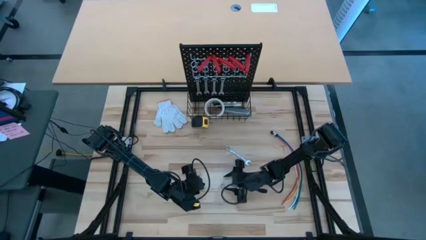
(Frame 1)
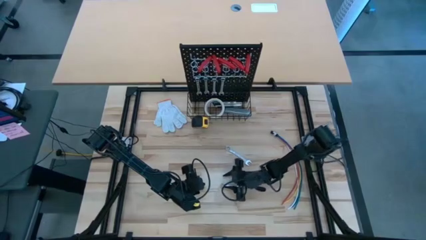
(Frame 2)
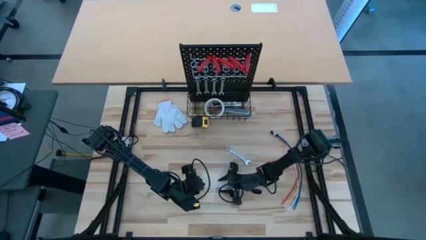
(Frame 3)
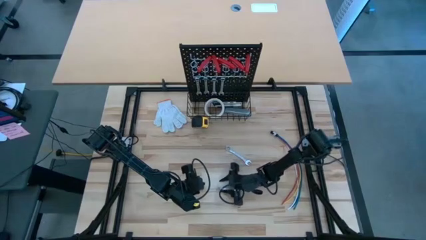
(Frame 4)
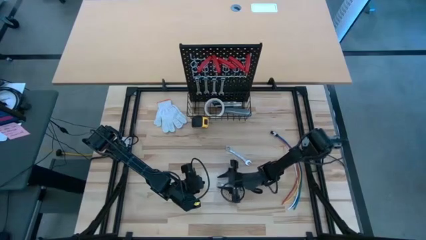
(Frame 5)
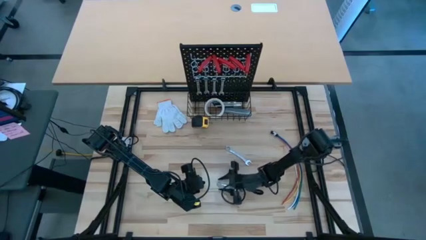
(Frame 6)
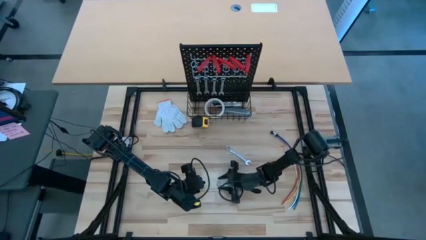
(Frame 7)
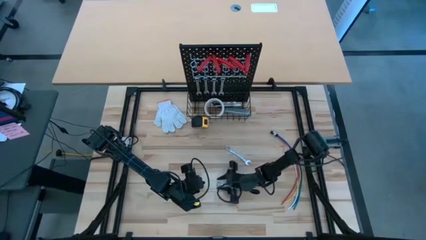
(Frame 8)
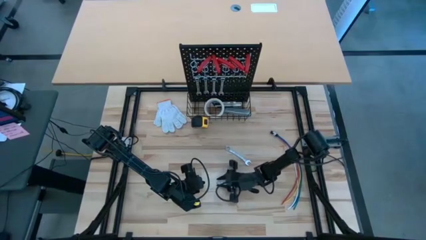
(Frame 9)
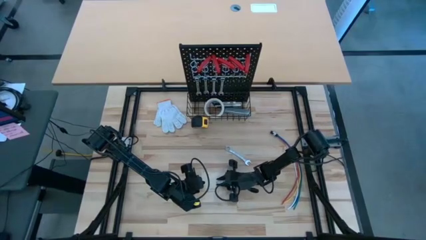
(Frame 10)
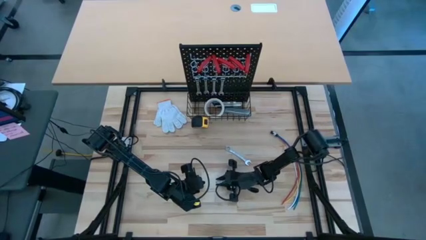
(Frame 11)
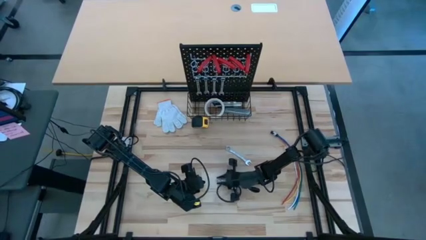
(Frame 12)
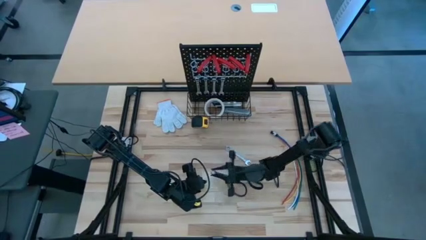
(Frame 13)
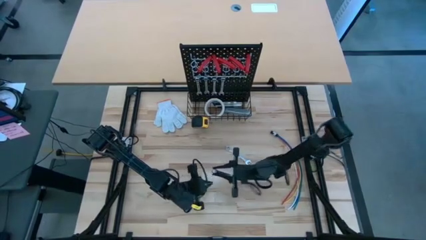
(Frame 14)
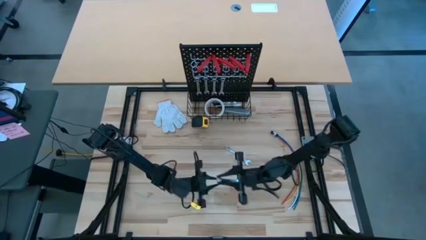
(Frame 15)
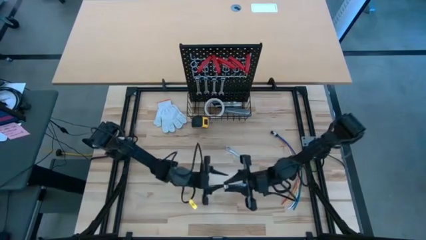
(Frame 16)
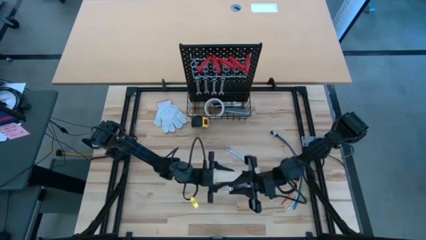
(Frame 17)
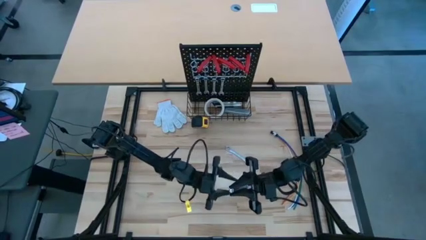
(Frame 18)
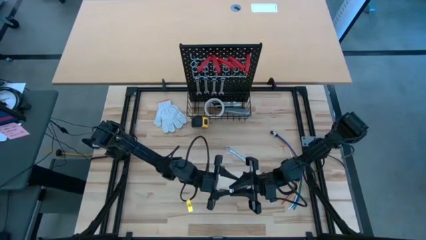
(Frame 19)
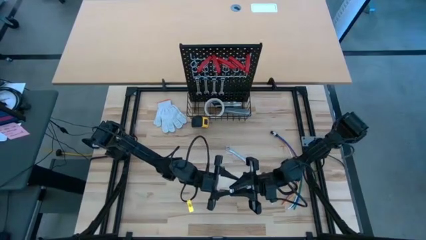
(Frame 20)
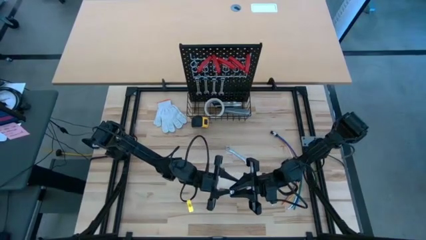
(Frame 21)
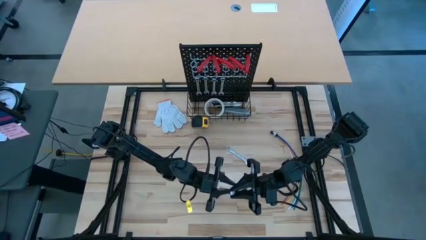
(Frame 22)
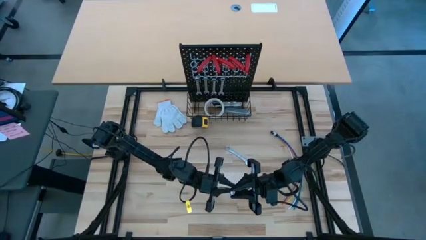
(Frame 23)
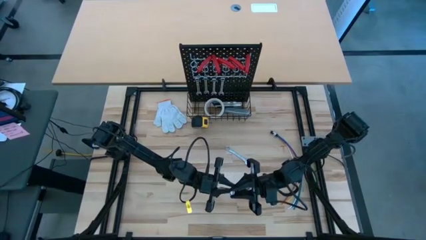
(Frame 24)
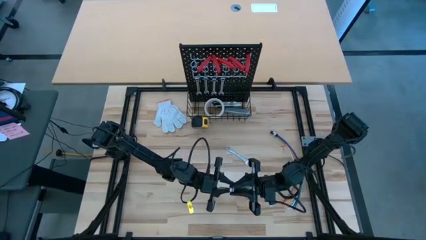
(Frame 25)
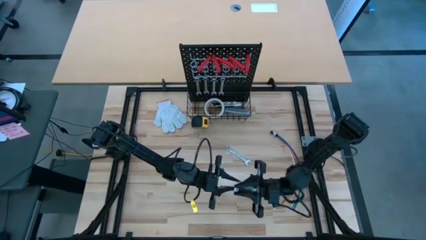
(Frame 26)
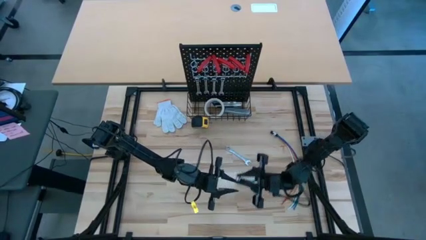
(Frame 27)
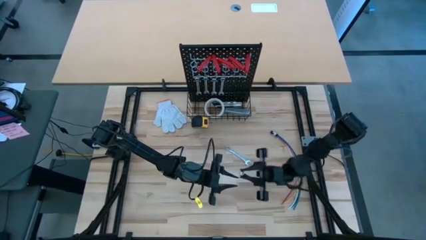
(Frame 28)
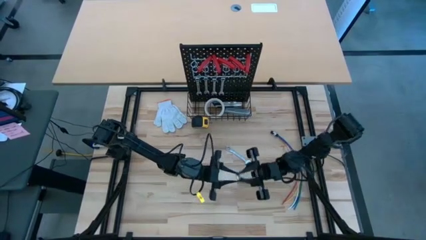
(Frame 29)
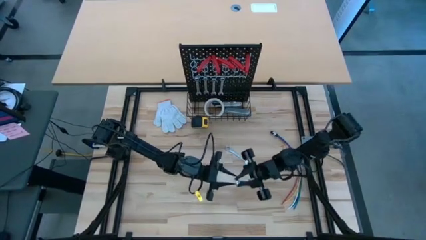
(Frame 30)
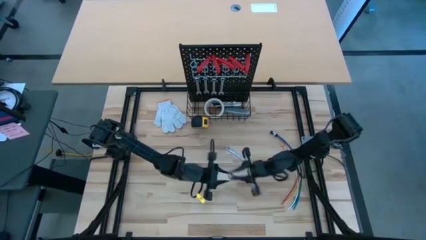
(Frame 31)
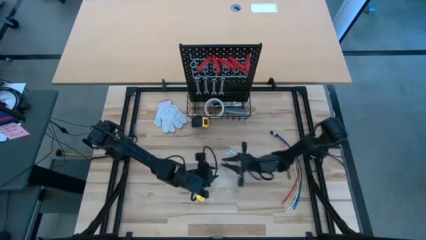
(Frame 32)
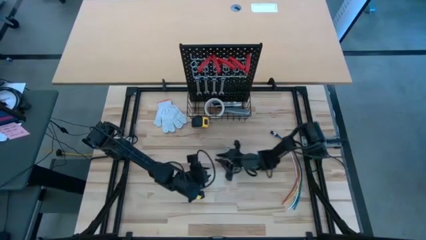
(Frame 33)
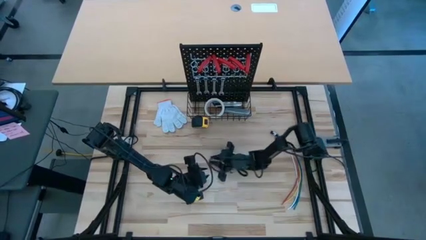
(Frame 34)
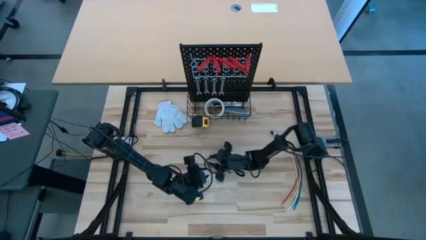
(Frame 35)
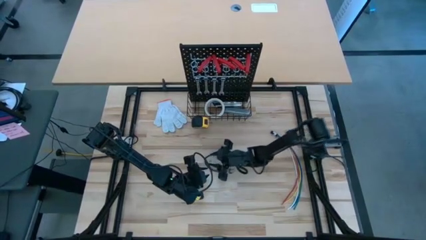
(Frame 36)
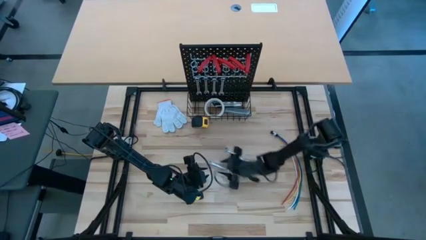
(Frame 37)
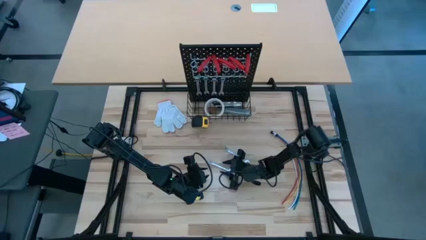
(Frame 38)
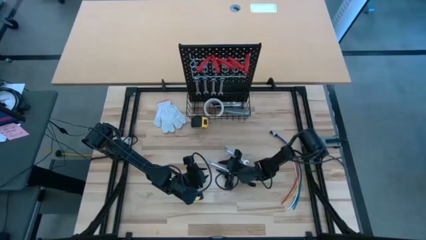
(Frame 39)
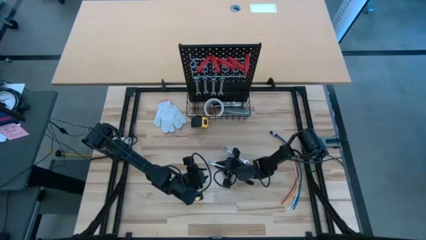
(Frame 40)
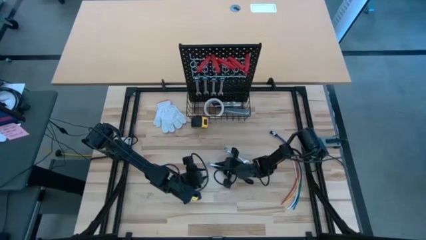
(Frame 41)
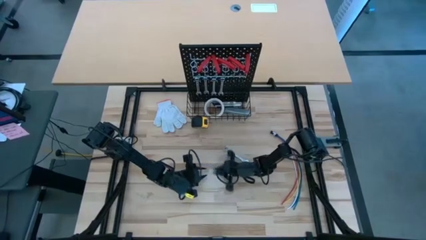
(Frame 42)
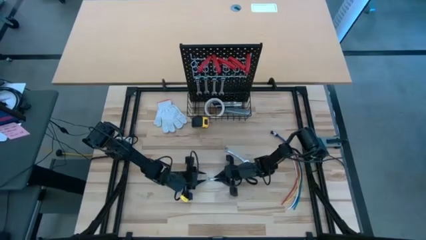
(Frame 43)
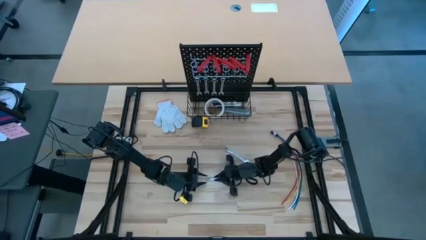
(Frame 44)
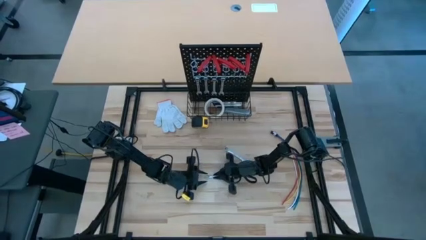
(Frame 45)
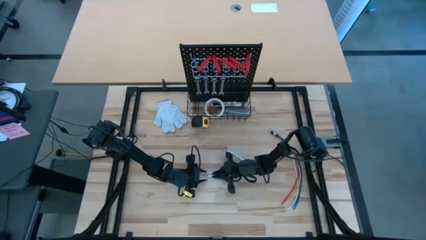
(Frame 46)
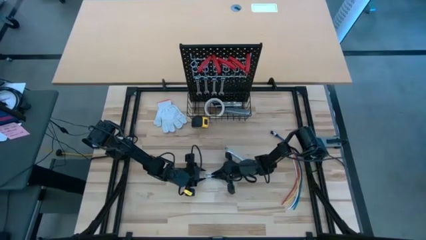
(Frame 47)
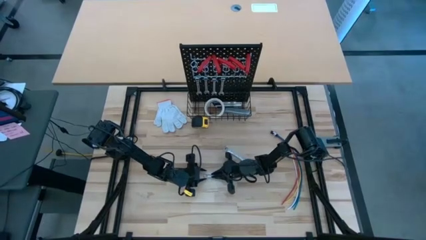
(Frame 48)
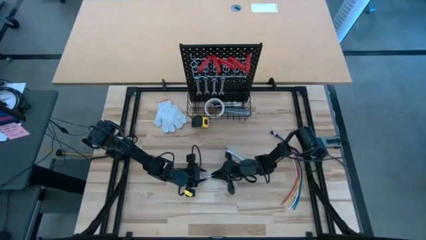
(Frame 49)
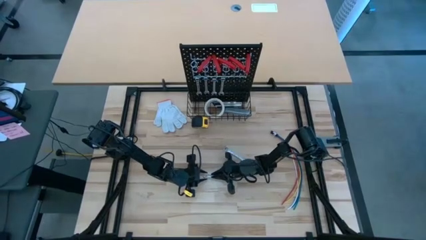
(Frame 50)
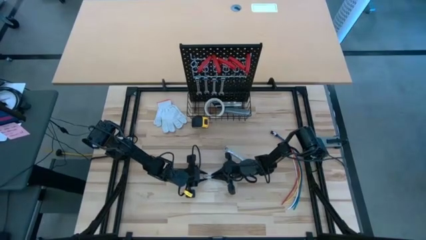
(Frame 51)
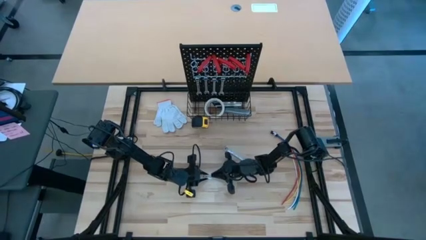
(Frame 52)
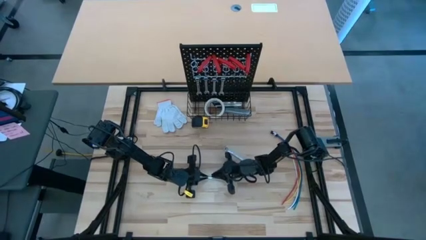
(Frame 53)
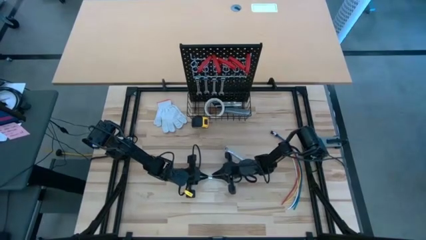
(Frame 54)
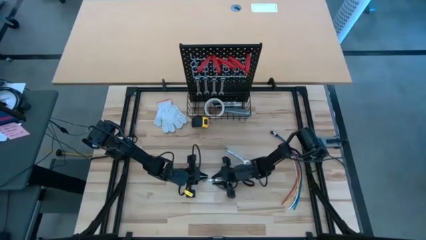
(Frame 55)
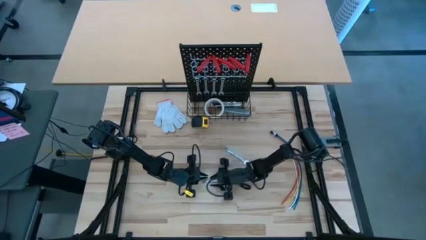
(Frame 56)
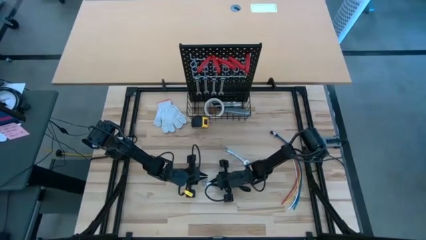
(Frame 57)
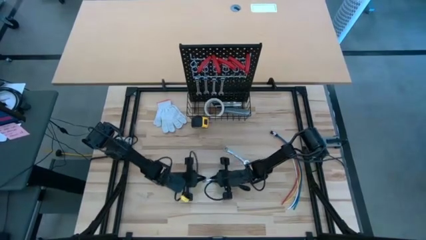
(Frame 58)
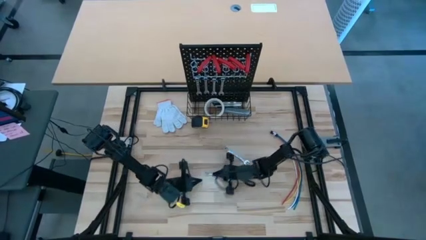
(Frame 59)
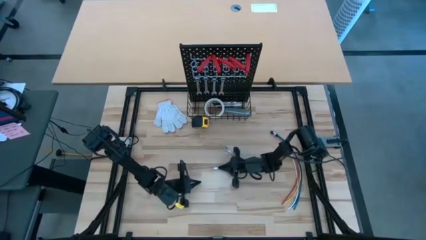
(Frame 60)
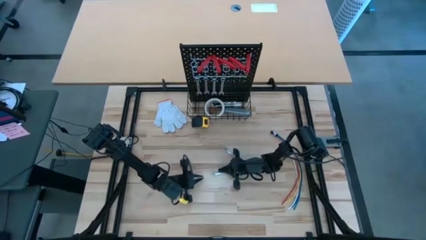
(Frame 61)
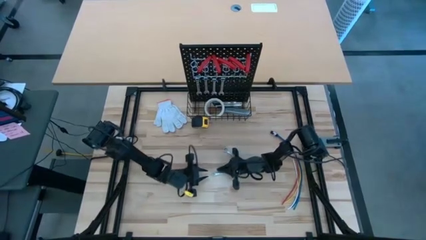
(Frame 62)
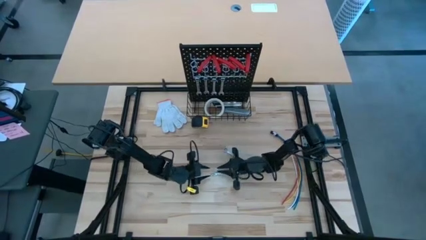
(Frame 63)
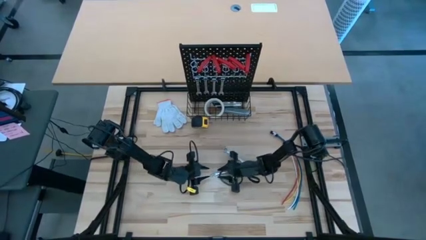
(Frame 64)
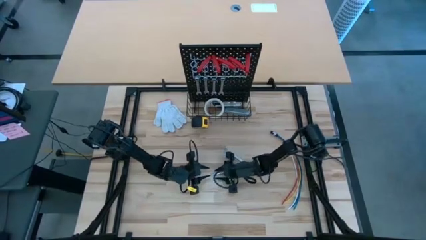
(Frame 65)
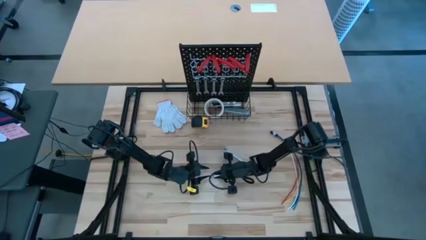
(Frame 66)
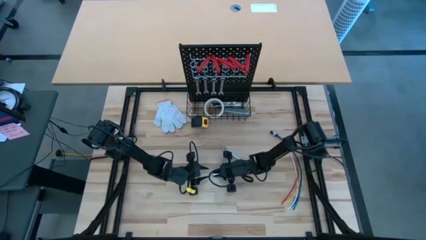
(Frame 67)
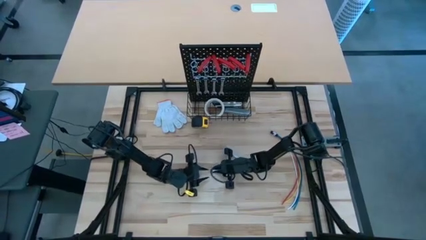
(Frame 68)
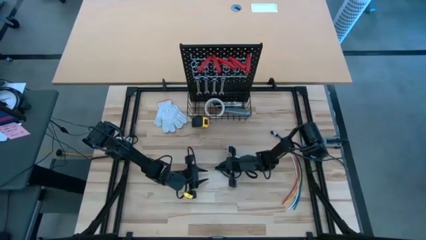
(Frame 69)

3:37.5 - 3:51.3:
Task: Hang tools onto peg board
Hang the silver wrench on the pegboard
